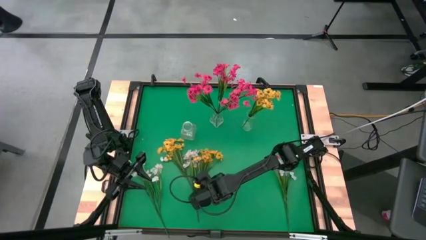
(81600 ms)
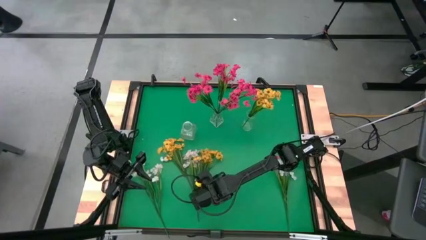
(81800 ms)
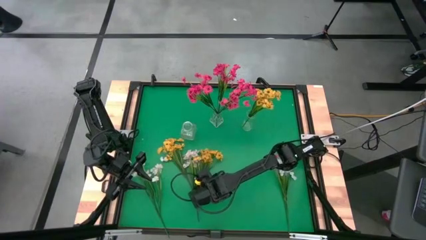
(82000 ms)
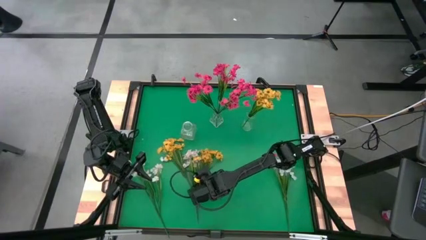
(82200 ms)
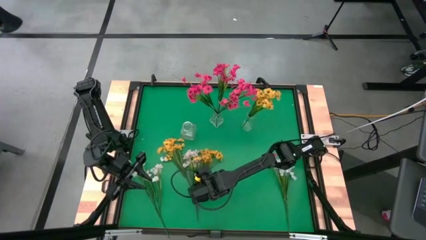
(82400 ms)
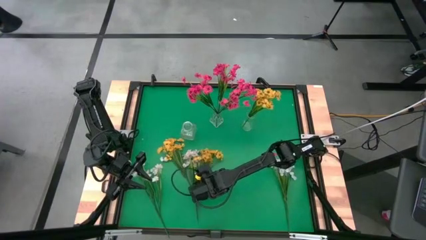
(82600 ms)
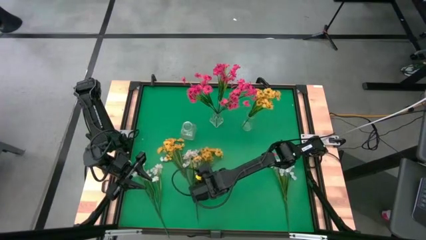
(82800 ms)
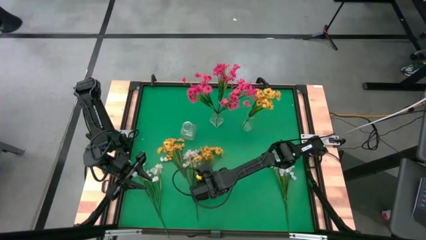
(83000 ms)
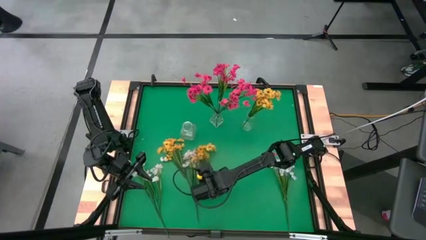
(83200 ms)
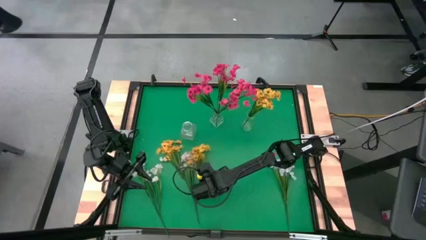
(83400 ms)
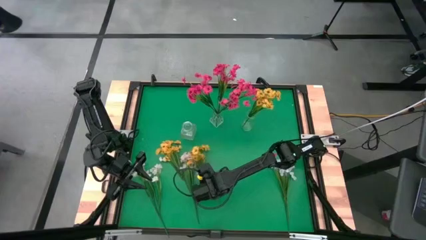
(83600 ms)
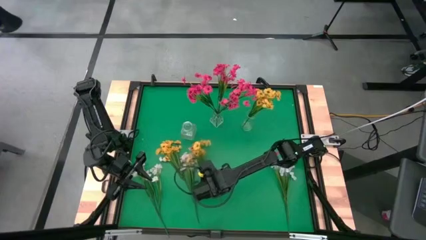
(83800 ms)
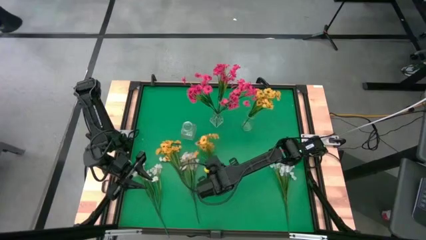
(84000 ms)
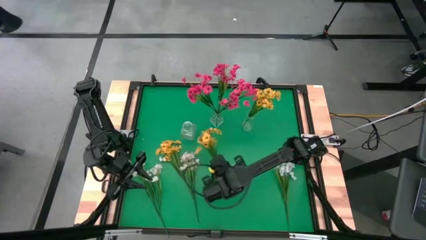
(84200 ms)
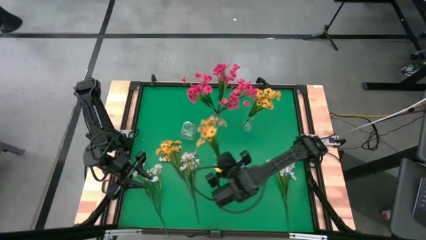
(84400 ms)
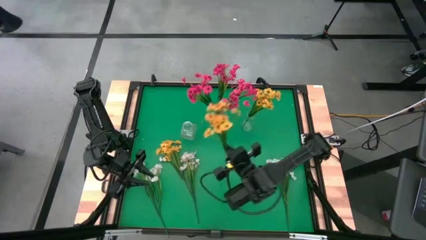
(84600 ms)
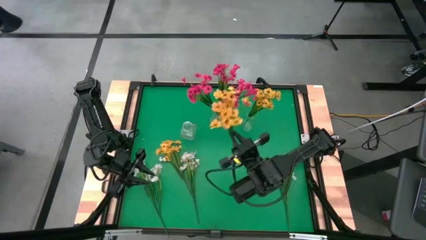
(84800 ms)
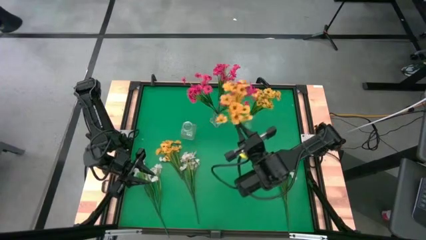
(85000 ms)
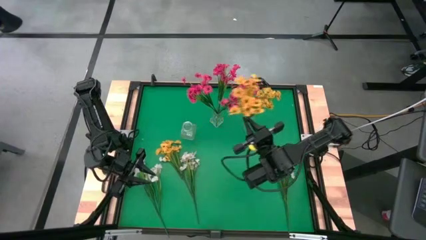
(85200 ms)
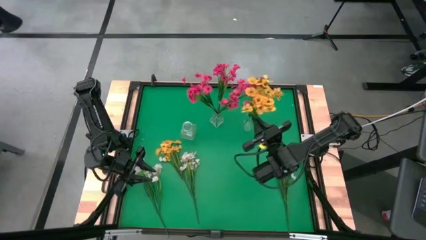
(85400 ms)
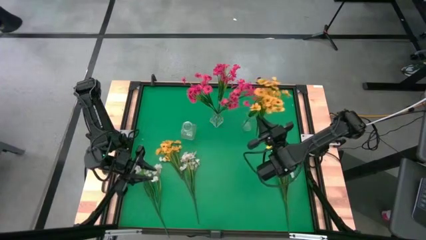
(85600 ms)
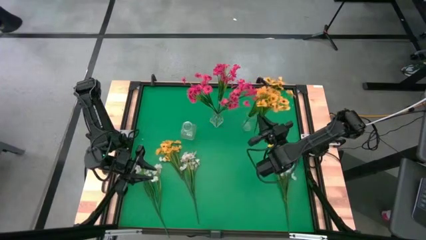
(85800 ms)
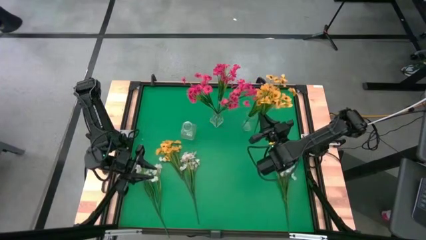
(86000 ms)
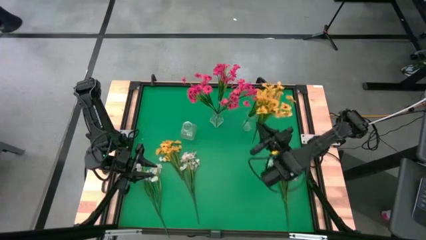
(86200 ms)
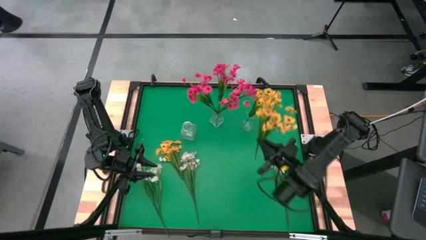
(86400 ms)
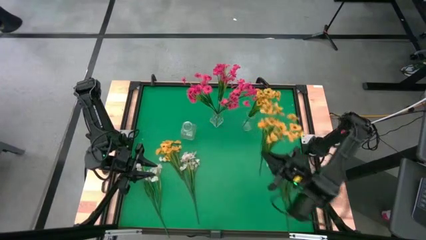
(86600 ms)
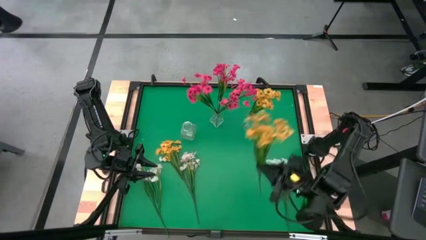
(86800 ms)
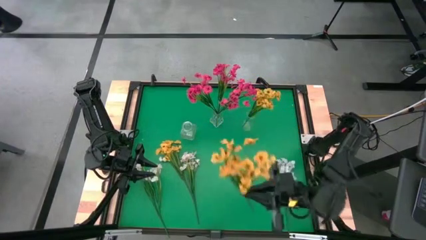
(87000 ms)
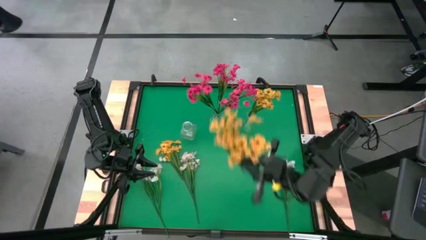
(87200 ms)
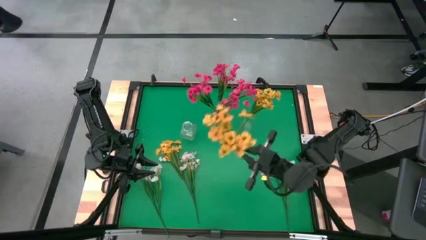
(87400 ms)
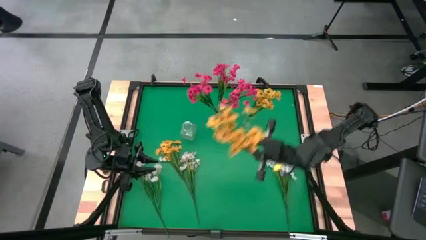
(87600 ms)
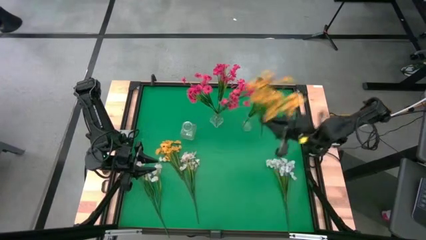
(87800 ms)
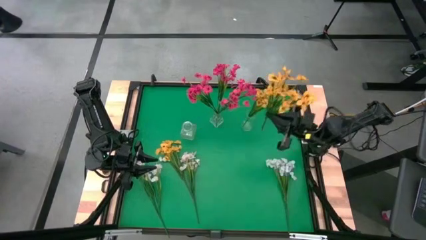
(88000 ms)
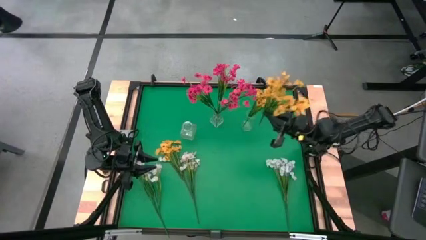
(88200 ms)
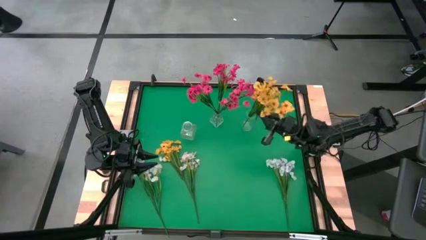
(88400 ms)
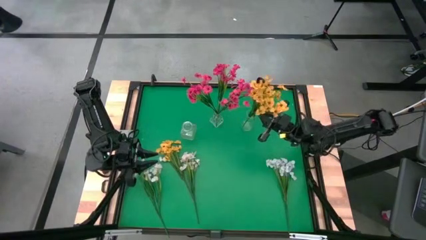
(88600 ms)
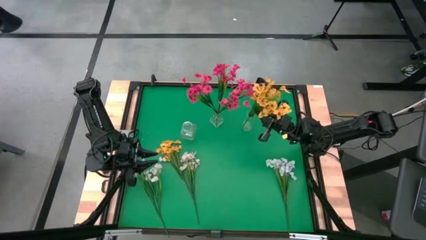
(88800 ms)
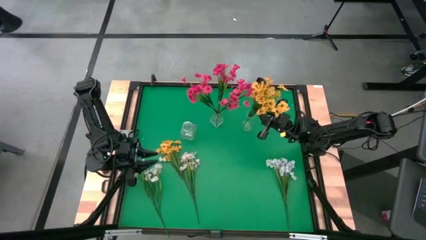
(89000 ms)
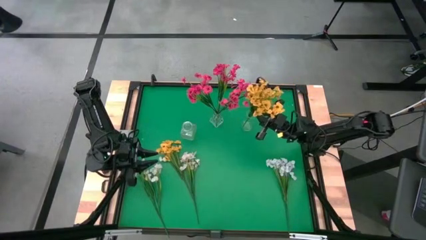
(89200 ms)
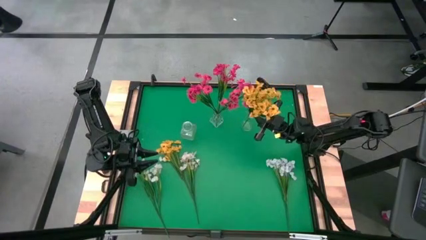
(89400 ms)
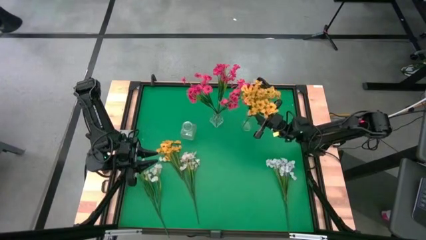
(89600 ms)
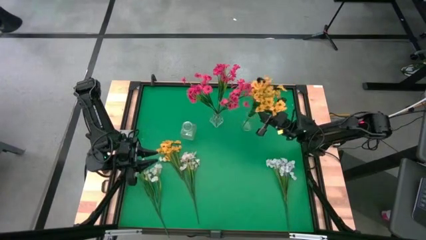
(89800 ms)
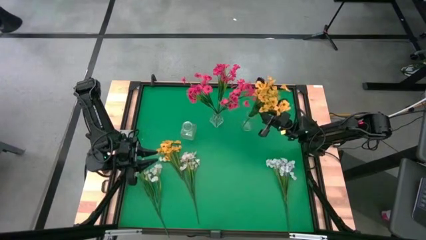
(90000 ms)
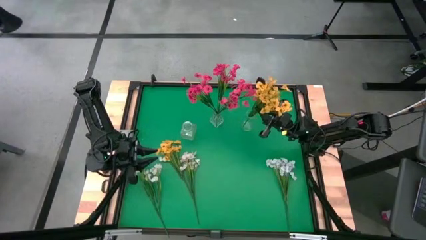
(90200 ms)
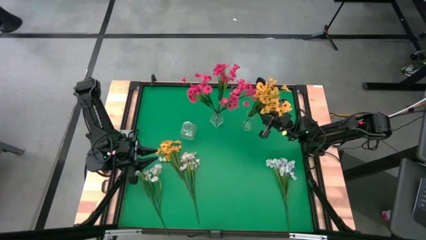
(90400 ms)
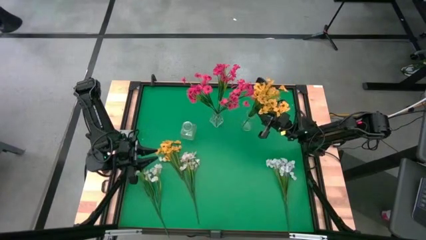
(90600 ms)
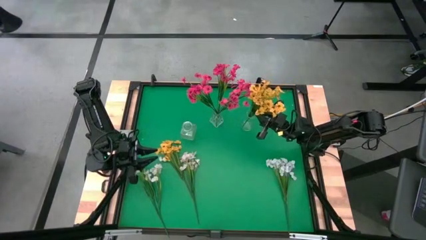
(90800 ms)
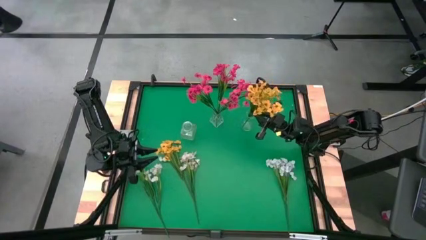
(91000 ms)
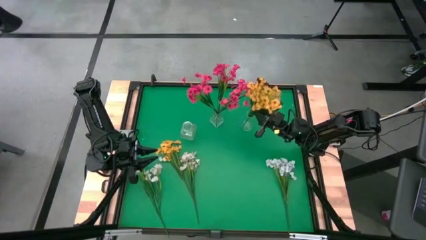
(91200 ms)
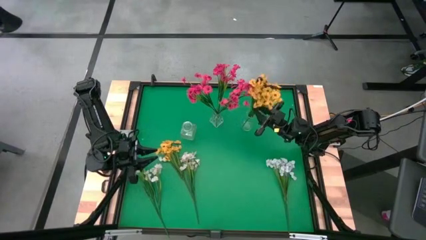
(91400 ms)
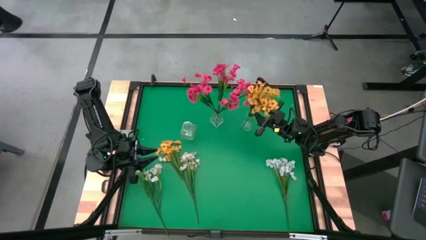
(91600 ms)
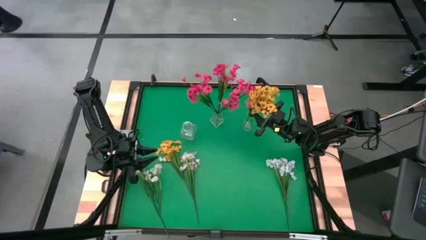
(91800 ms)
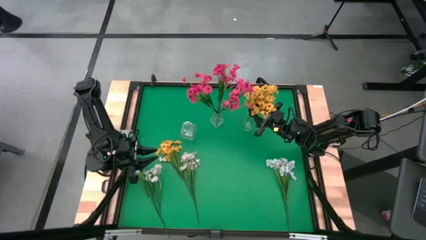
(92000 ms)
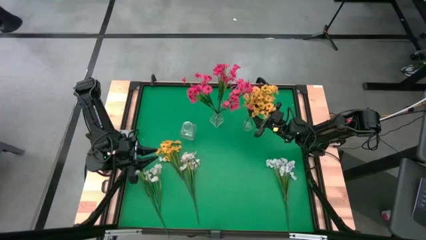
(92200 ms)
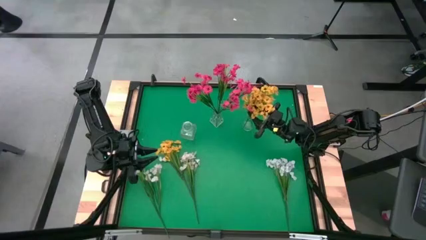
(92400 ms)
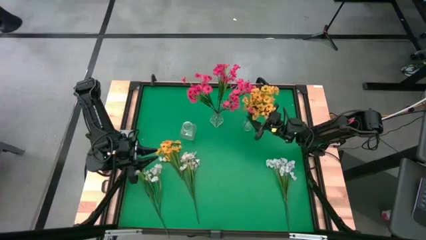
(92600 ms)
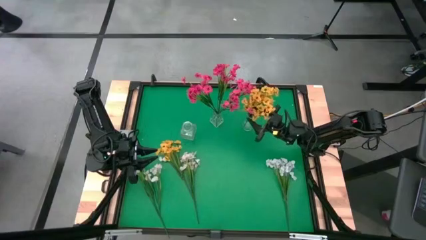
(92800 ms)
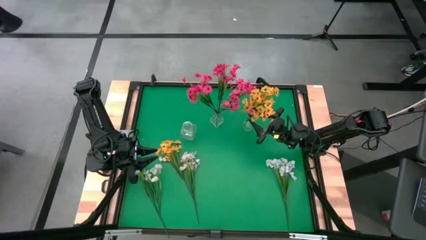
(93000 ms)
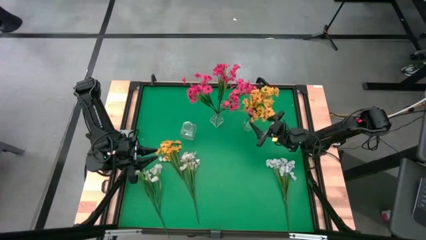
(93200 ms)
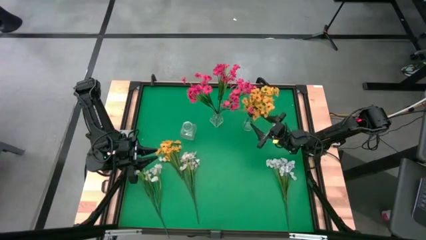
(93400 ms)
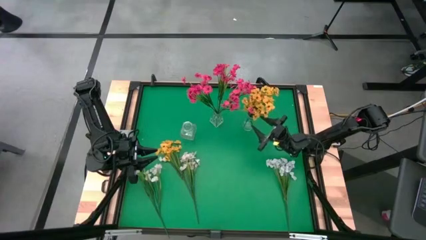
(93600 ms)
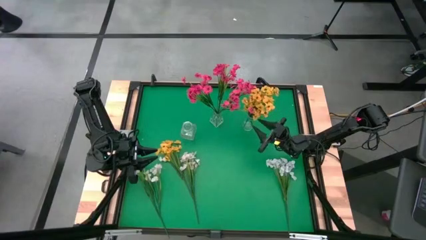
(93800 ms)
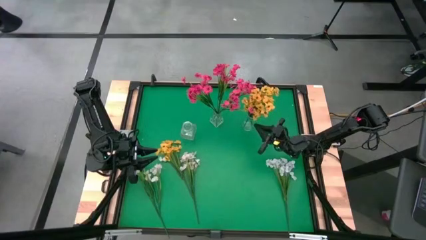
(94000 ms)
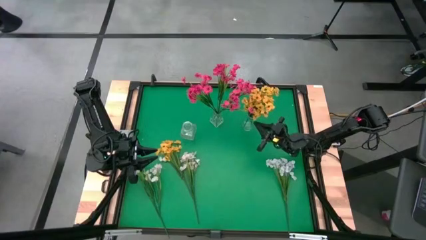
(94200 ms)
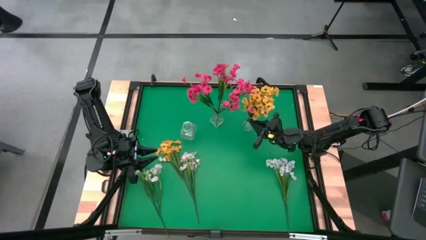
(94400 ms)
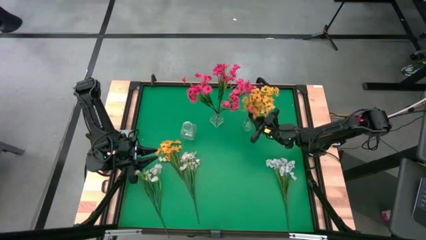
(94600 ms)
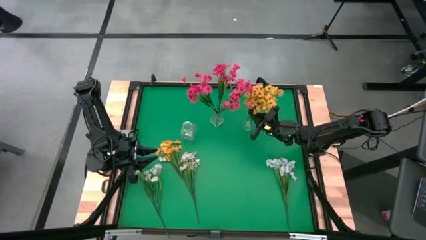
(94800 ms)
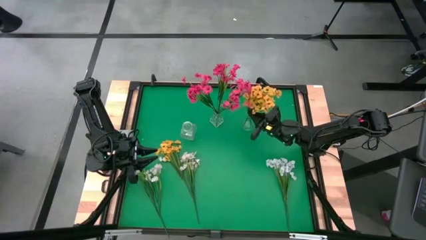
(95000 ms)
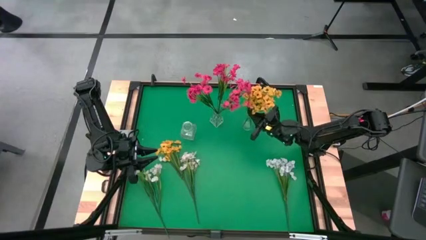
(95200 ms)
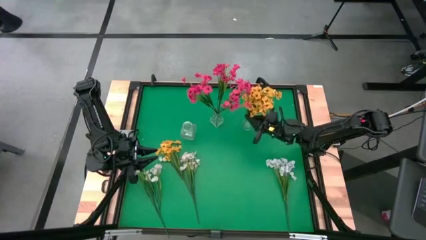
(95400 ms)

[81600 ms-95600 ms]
Task: Sort flowers into vase by color
Put the right yellow flower into the right transparent vase
